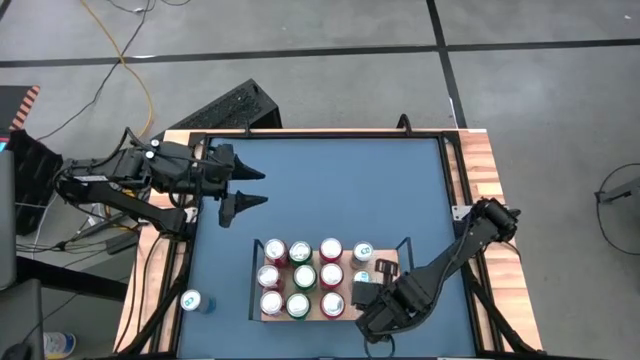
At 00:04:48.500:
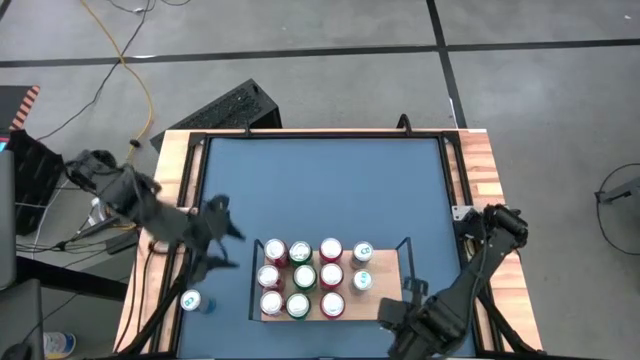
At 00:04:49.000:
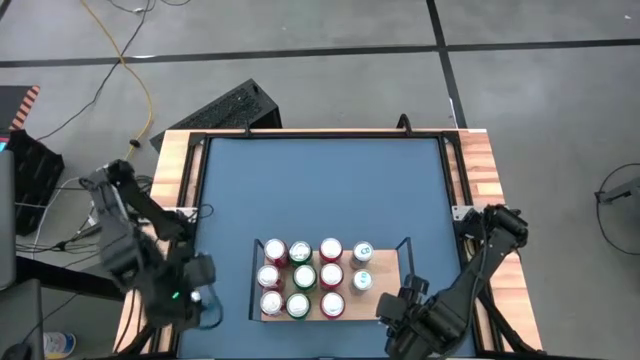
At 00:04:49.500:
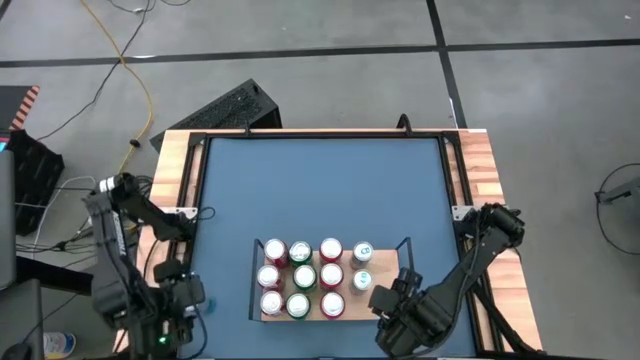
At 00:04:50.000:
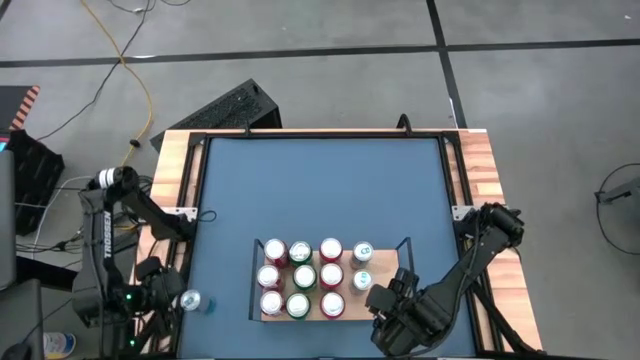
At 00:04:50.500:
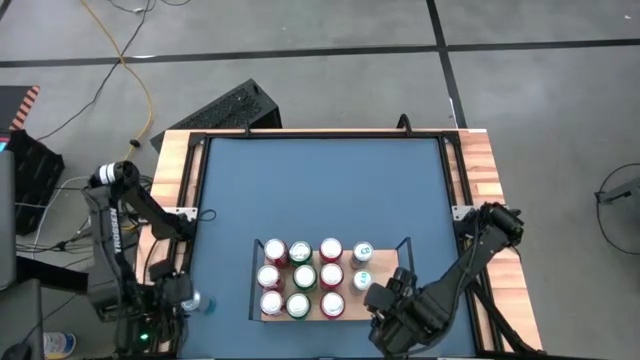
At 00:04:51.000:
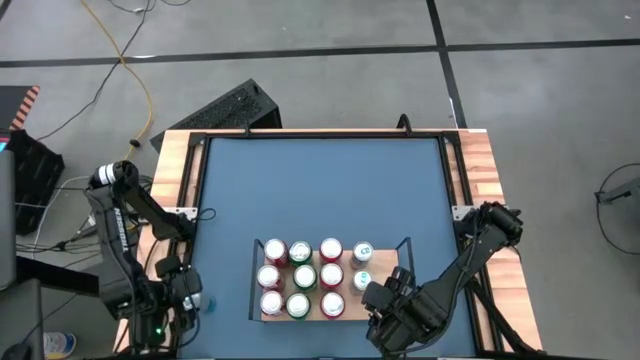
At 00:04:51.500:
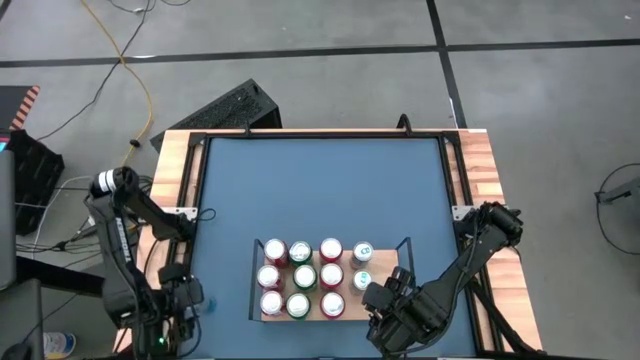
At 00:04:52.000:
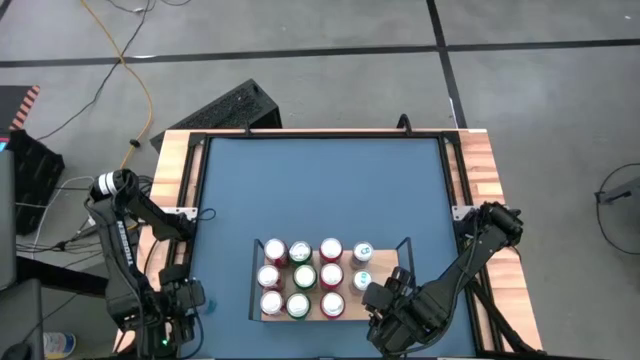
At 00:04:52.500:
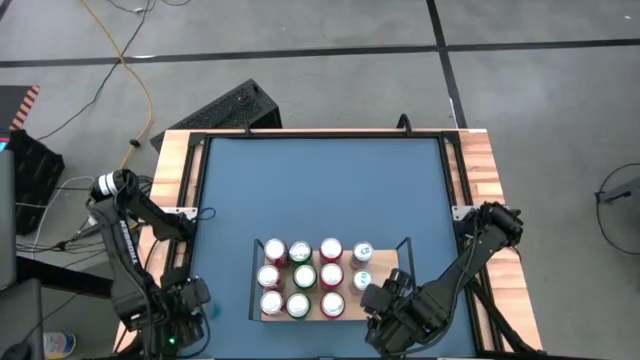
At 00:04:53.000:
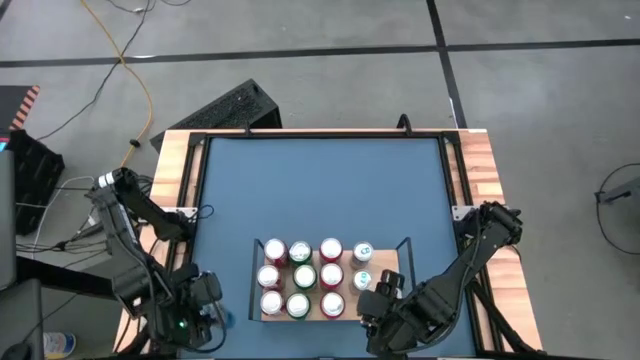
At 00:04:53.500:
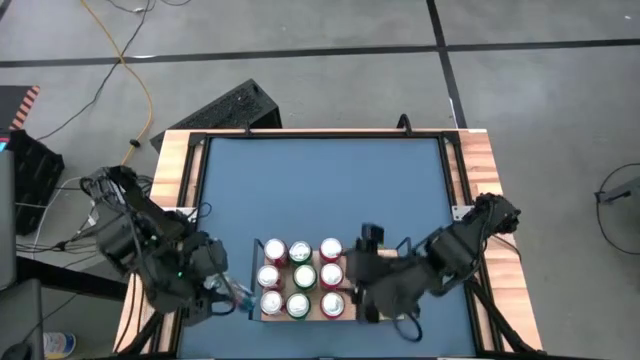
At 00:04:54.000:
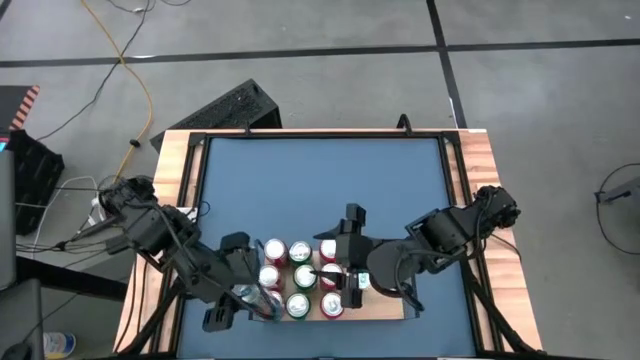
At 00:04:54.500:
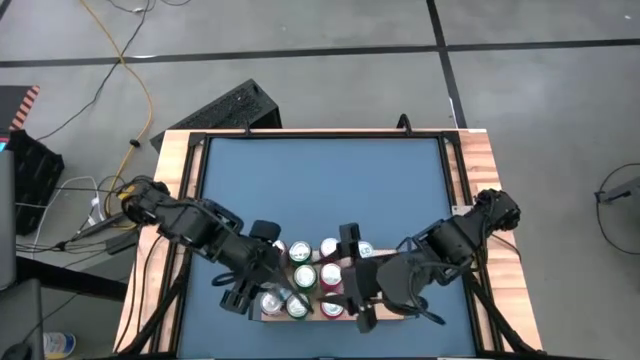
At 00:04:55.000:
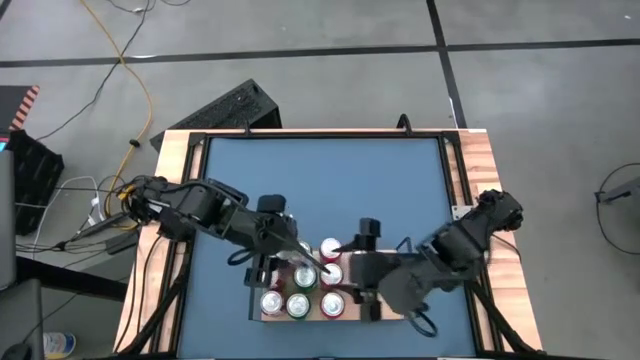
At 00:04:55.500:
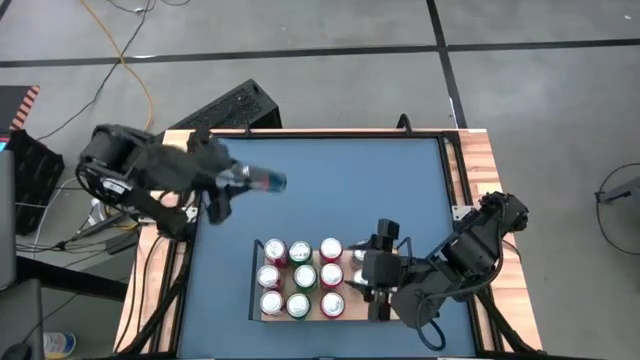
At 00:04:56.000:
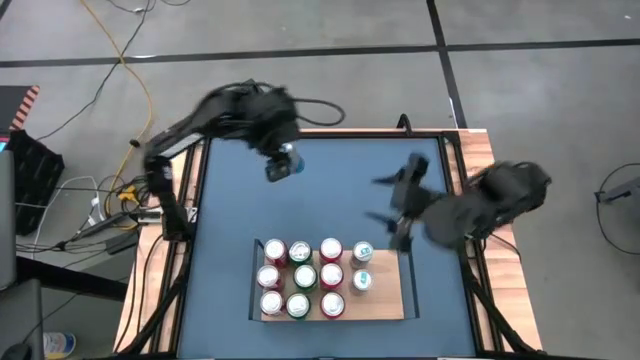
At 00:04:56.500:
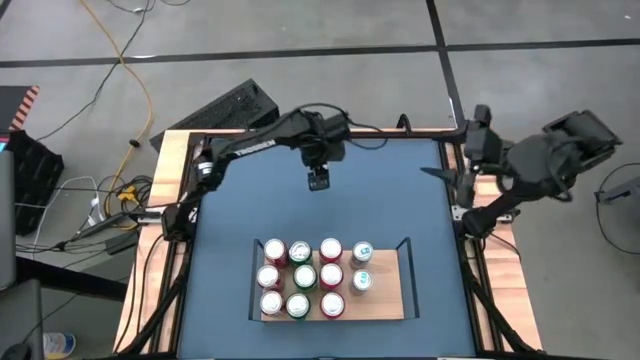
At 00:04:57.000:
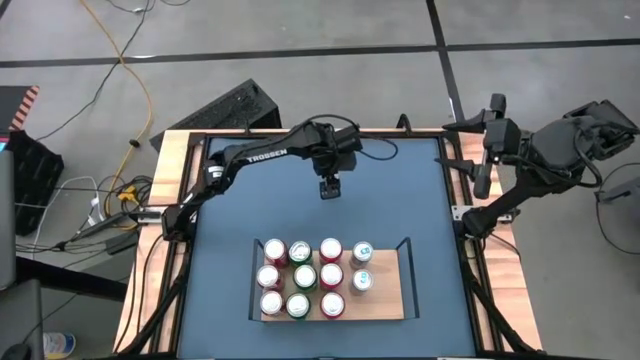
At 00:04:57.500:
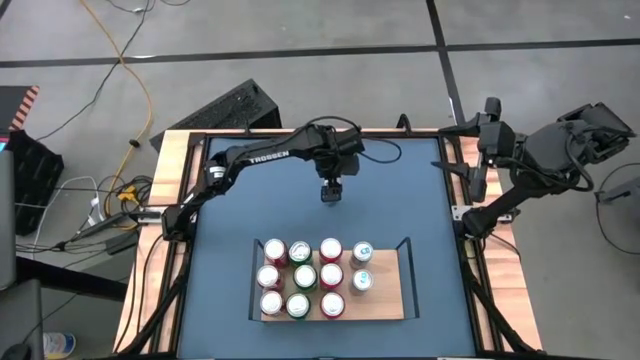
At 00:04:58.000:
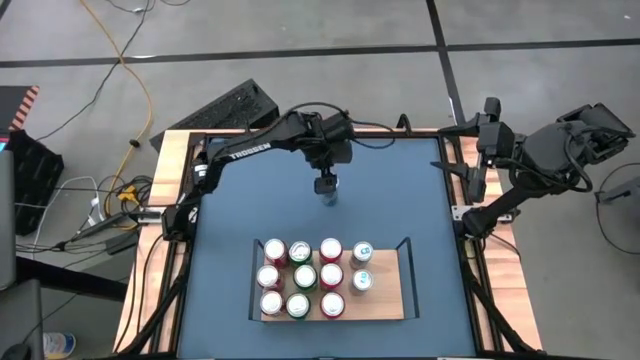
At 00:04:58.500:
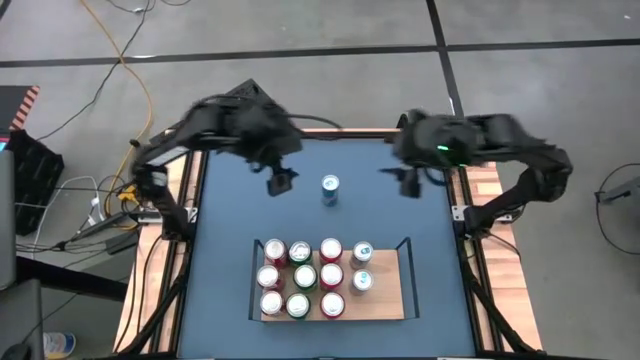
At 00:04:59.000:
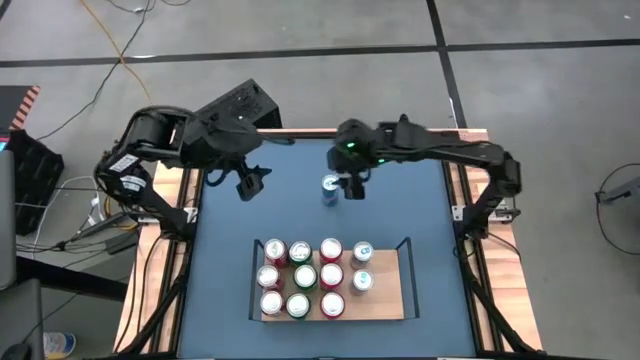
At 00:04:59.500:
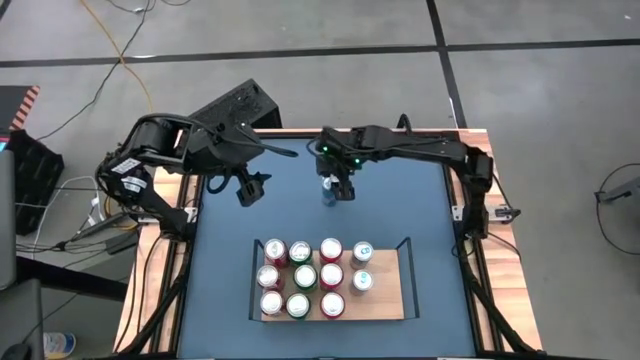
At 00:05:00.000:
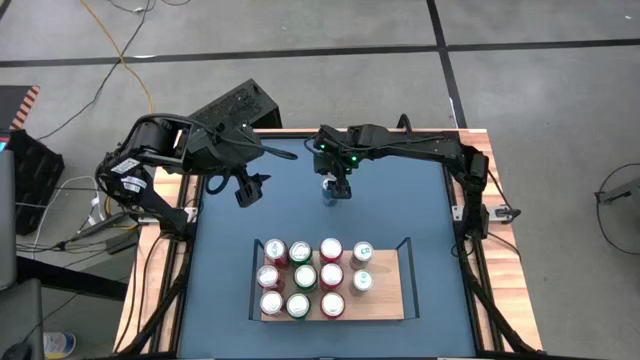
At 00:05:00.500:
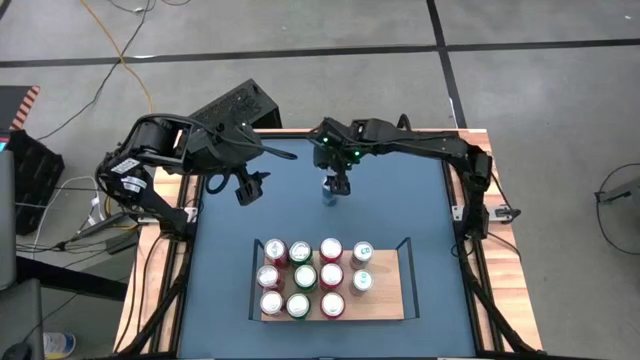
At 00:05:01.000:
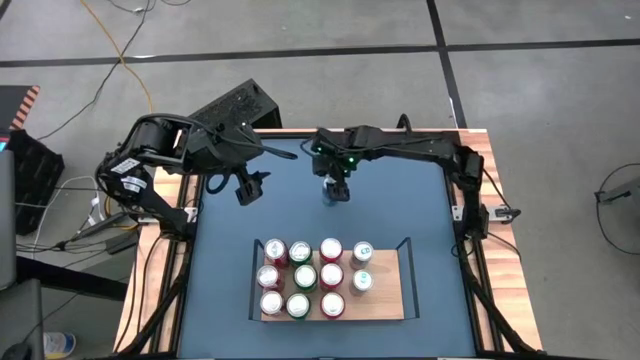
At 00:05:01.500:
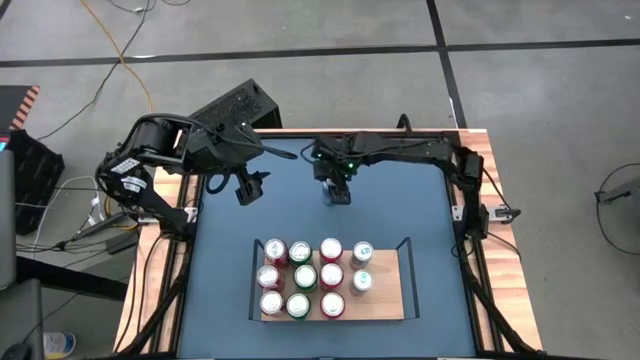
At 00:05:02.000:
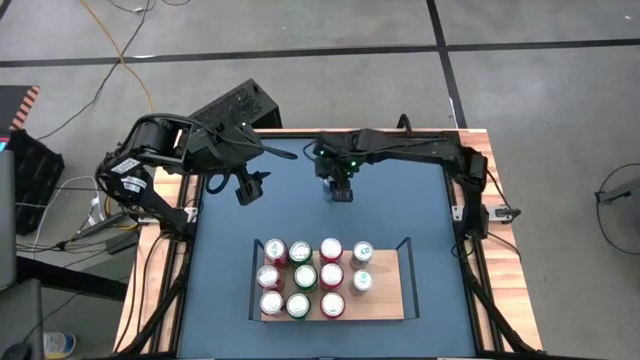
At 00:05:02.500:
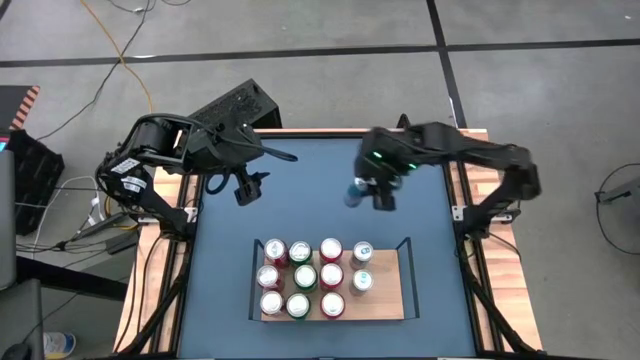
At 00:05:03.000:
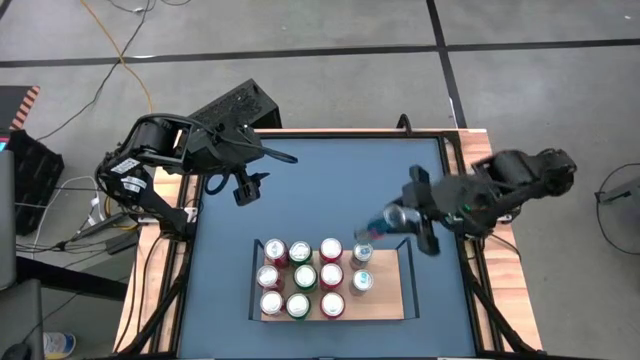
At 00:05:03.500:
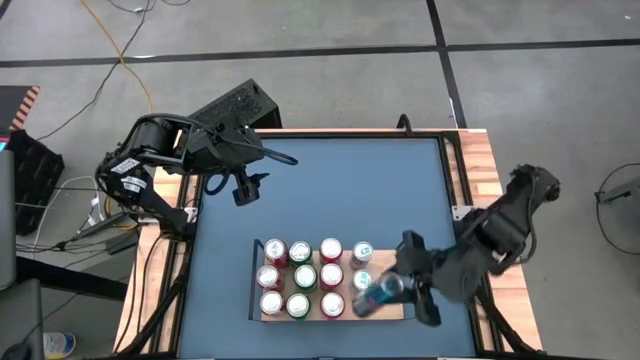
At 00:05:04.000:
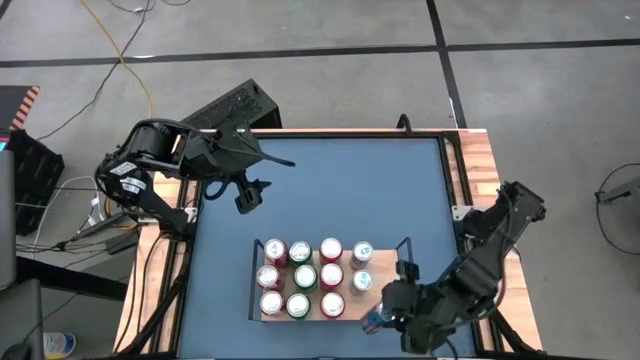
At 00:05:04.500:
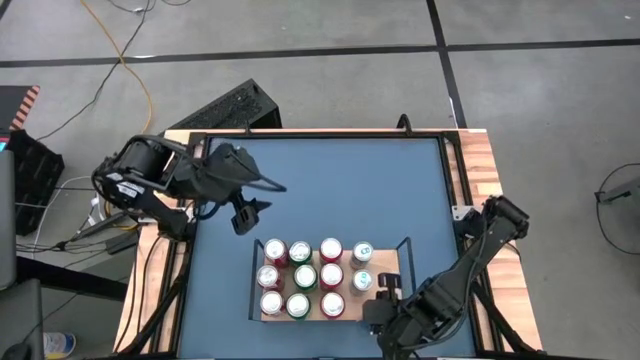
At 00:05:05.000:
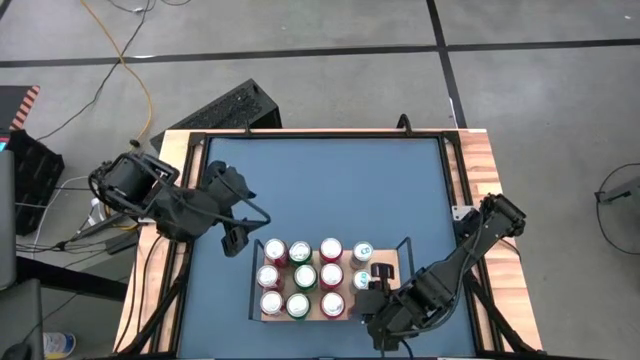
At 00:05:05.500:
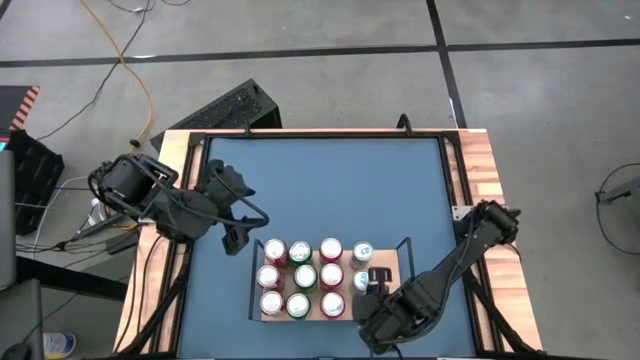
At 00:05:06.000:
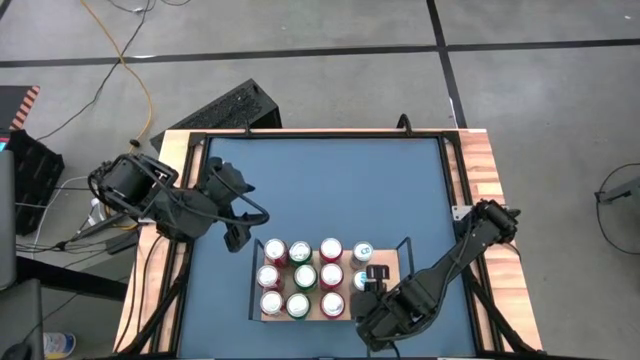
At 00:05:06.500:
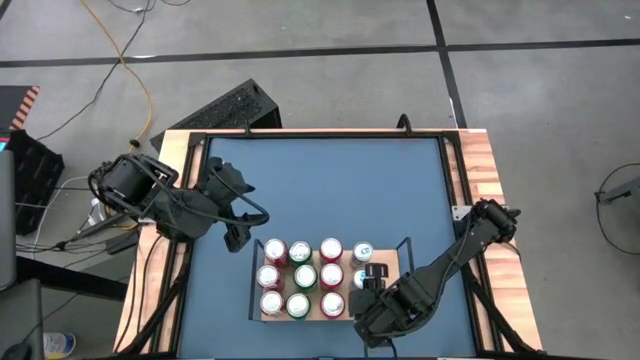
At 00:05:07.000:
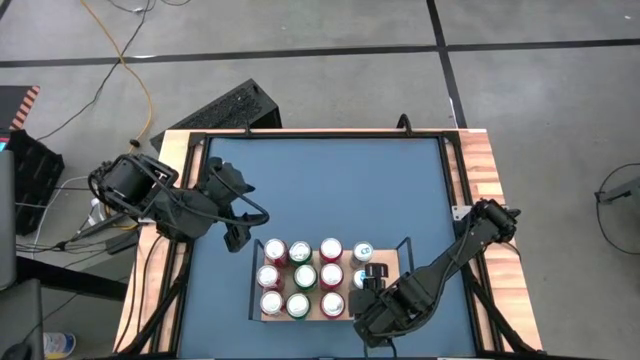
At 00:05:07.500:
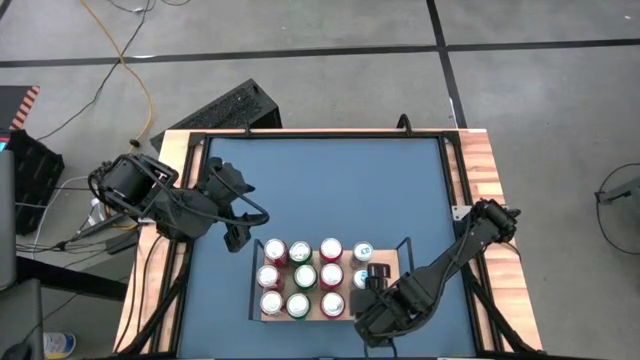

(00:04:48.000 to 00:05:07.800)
Task: Place canned beverage on shelf
Put the blue soda can on the shelf aligned with the other blue soda can

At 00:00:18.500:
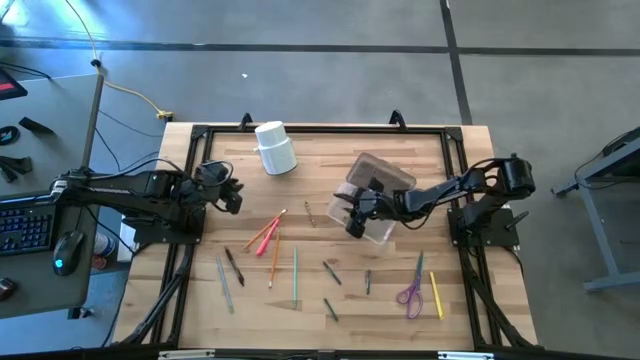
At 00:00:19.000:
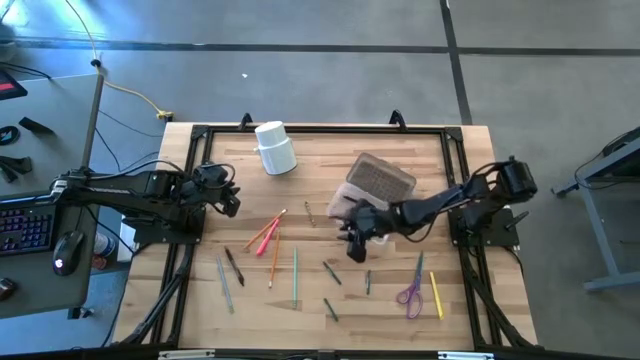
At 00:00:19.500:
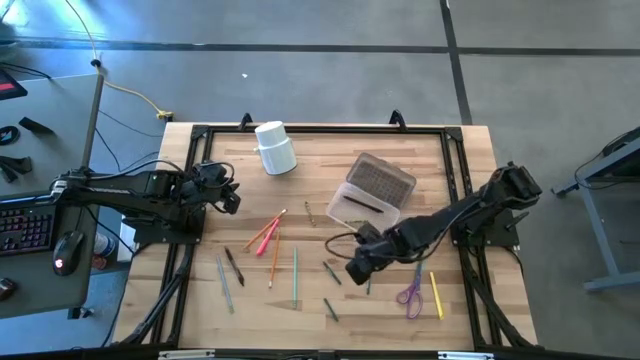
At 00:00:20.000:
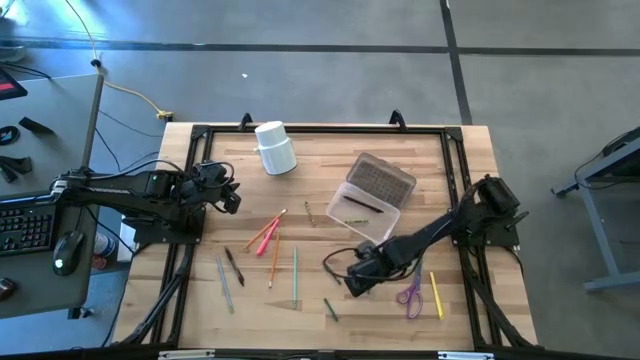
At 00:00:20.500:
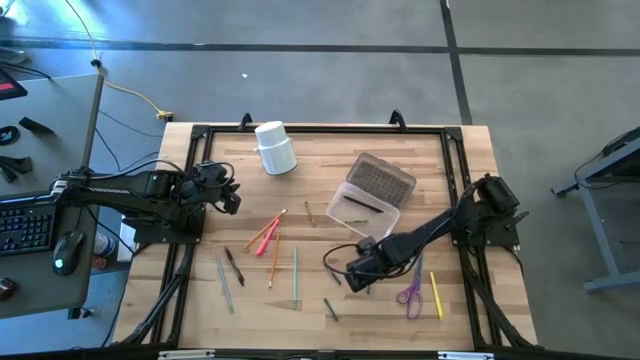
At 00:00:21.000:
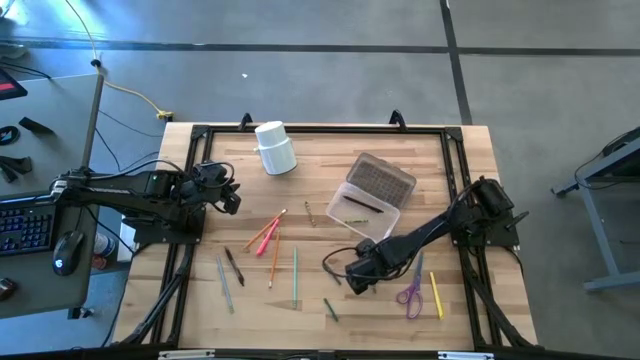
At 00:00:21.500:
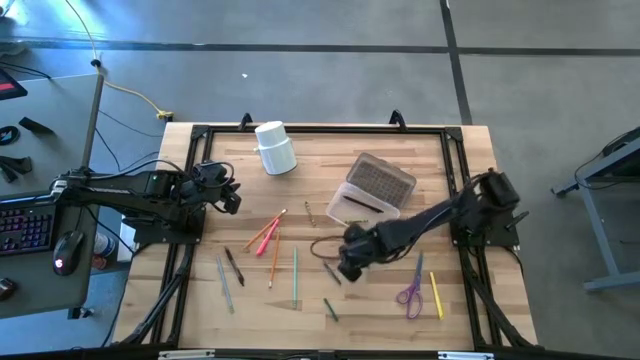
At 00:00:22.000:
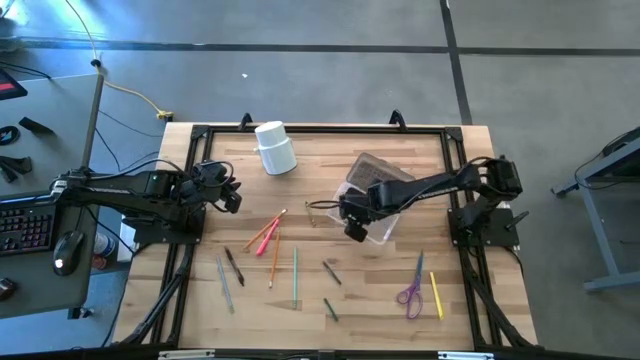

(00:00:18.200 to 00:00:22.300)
Task: Pick & place school supplies into a supply box
Put the top right dark green crayon into the supply box
